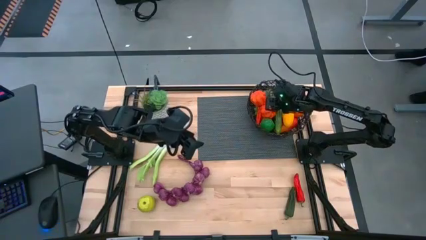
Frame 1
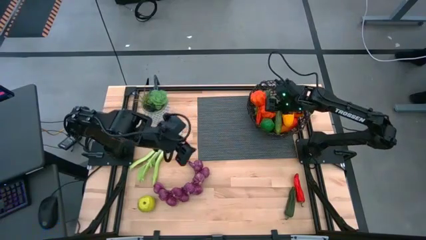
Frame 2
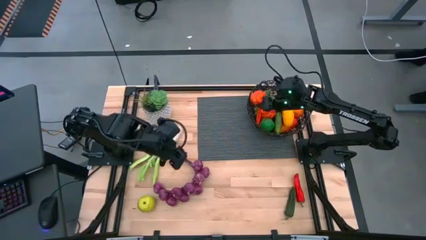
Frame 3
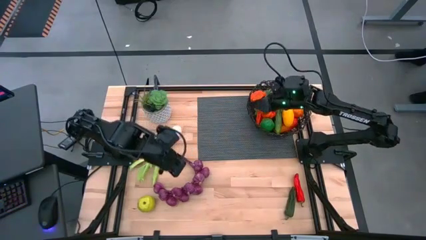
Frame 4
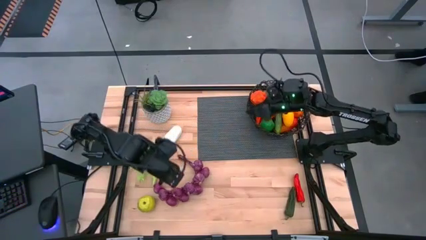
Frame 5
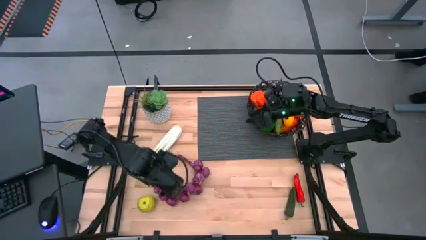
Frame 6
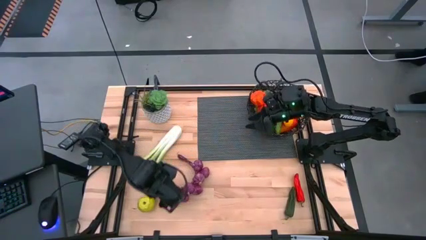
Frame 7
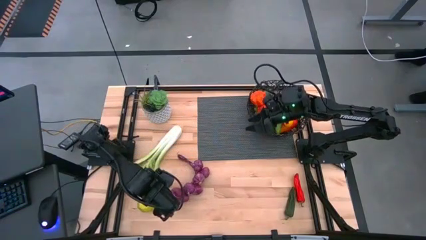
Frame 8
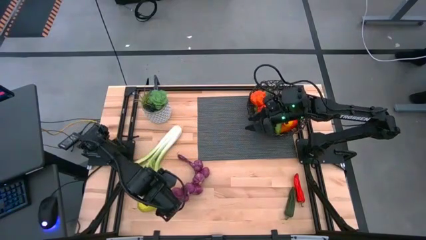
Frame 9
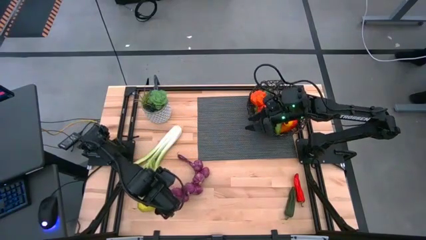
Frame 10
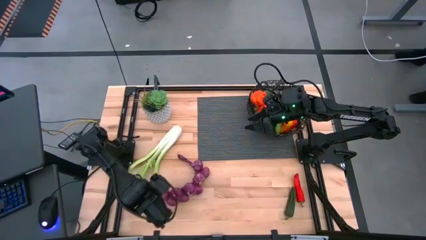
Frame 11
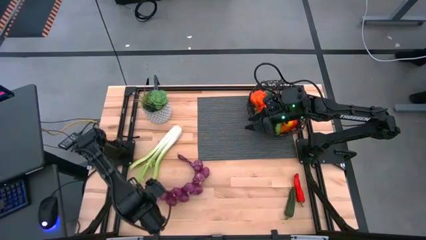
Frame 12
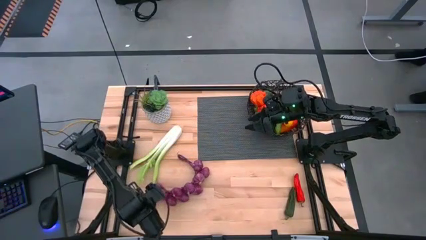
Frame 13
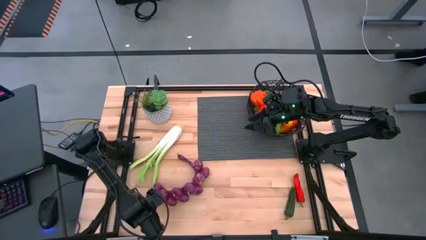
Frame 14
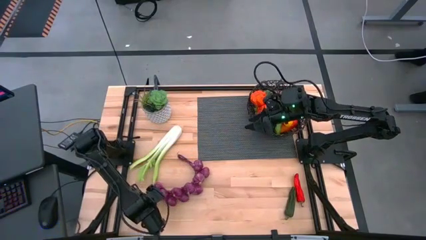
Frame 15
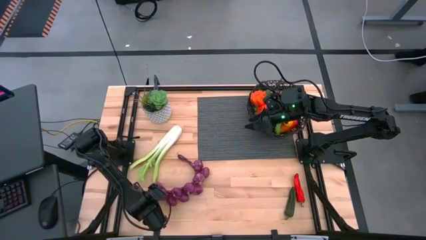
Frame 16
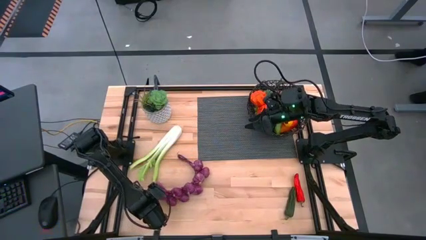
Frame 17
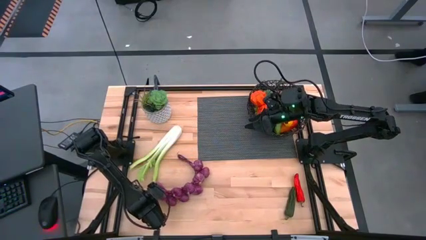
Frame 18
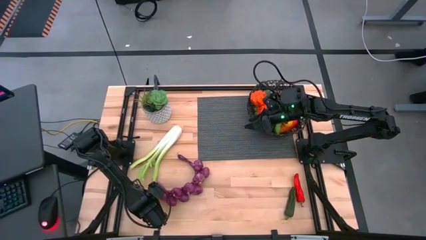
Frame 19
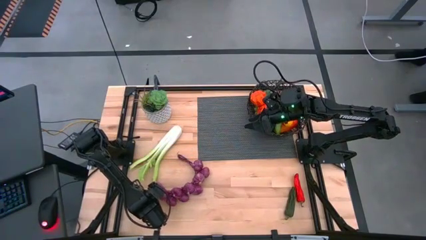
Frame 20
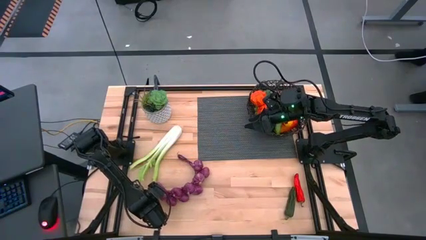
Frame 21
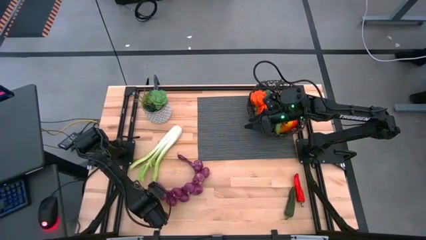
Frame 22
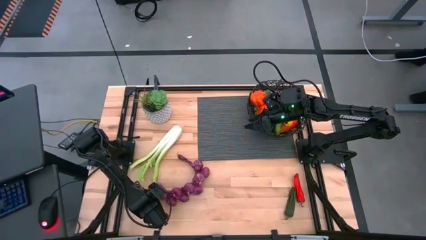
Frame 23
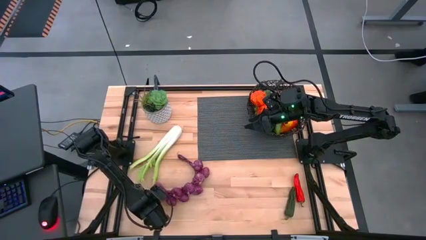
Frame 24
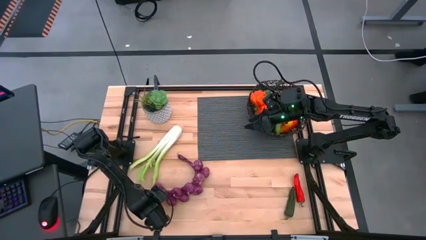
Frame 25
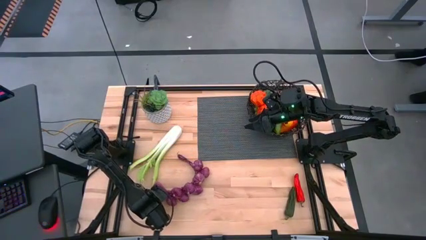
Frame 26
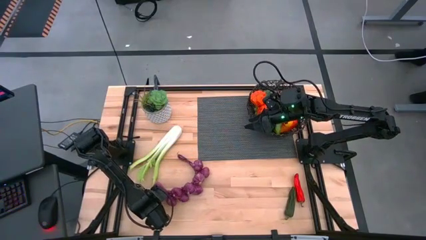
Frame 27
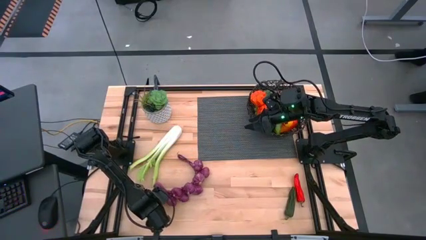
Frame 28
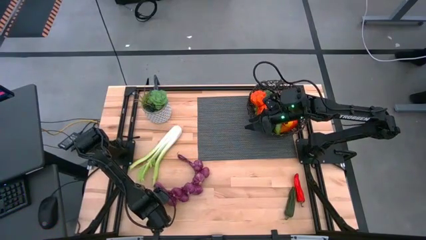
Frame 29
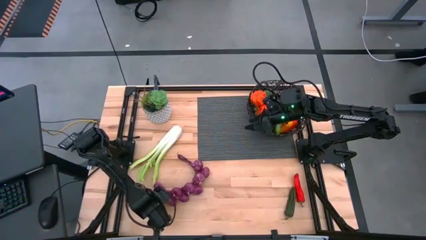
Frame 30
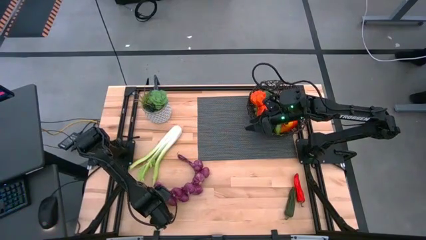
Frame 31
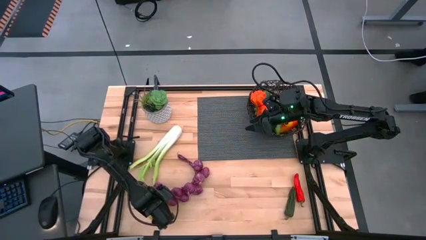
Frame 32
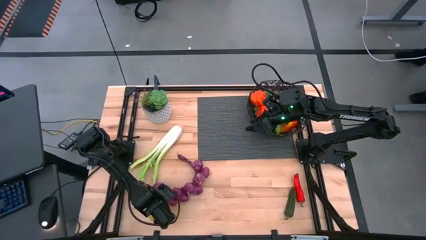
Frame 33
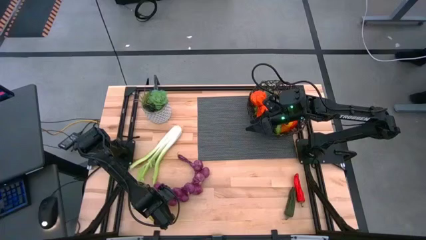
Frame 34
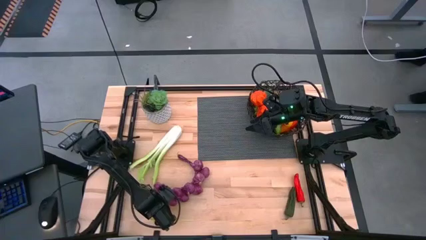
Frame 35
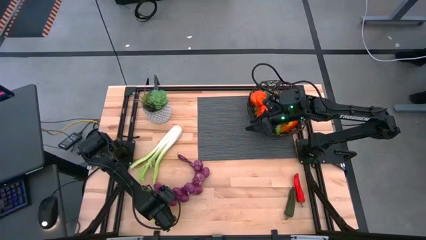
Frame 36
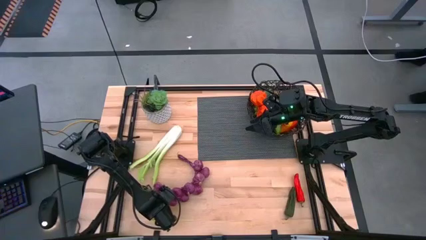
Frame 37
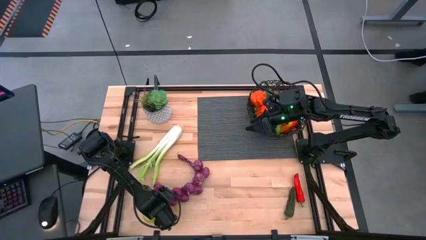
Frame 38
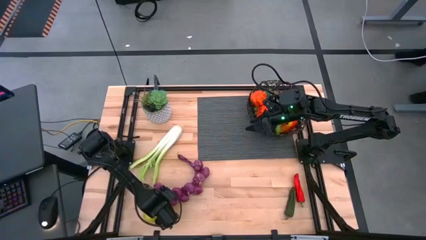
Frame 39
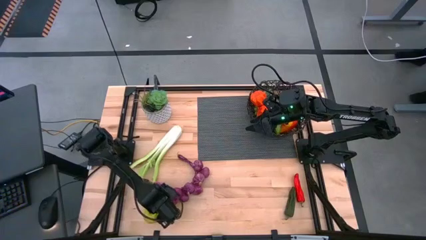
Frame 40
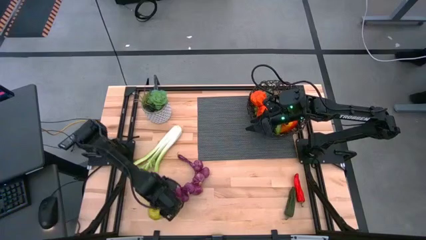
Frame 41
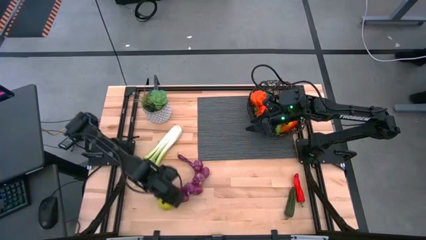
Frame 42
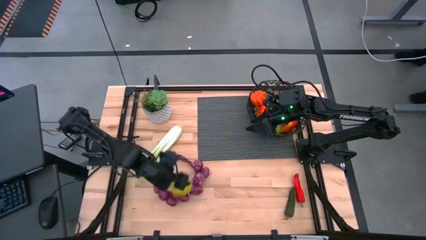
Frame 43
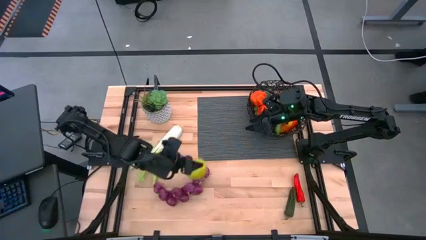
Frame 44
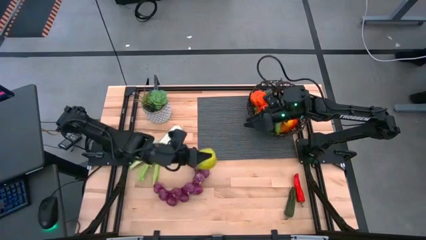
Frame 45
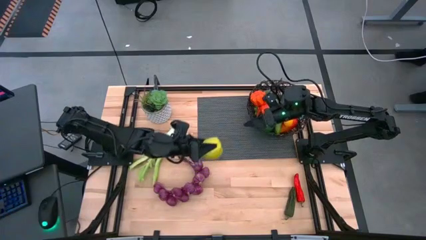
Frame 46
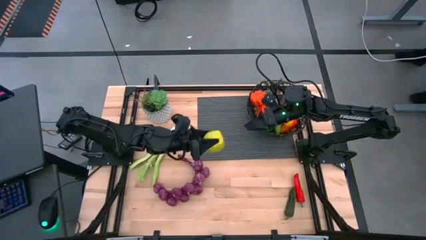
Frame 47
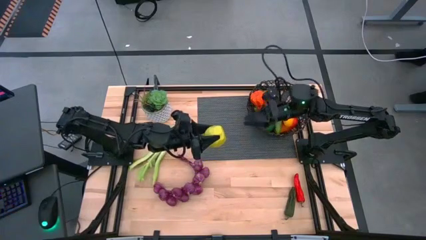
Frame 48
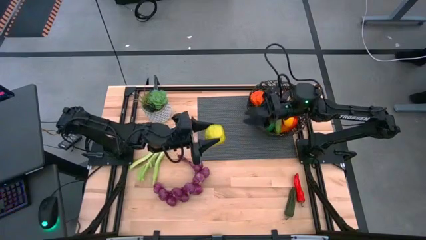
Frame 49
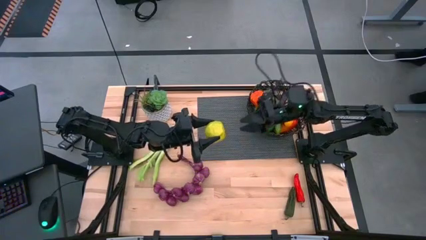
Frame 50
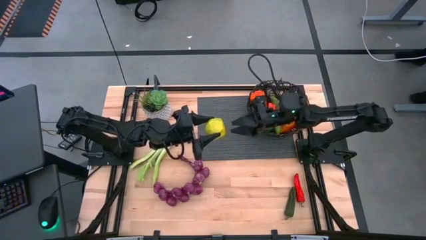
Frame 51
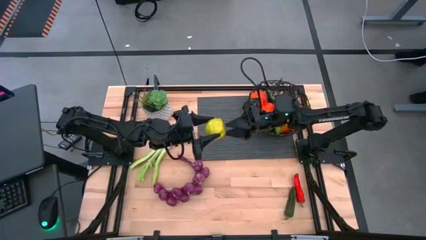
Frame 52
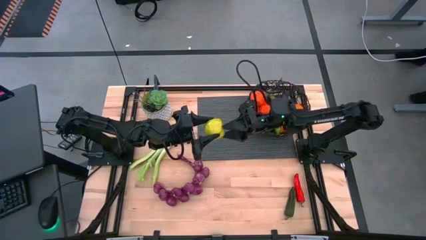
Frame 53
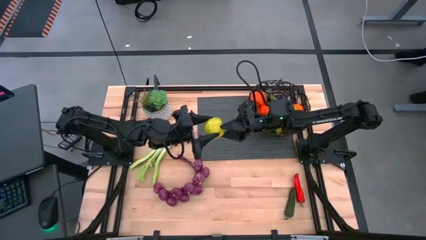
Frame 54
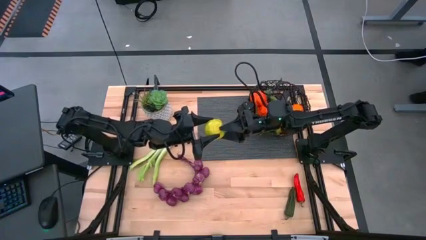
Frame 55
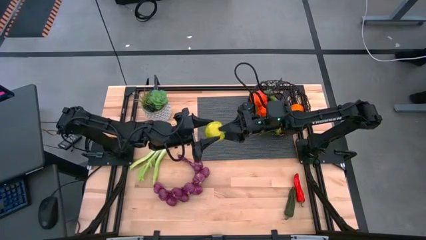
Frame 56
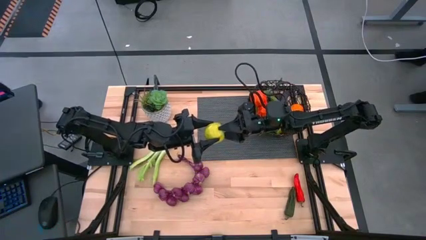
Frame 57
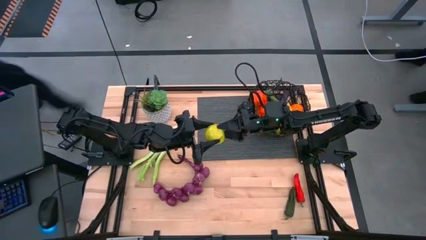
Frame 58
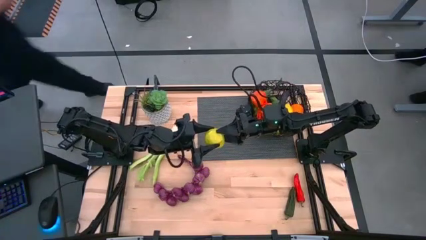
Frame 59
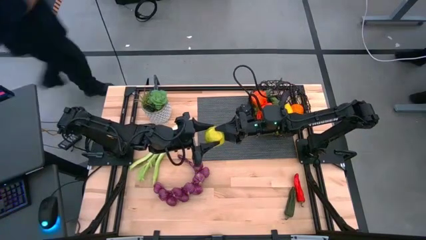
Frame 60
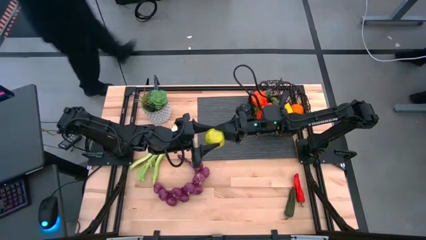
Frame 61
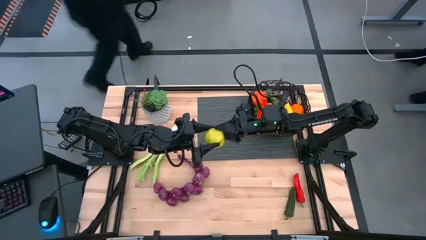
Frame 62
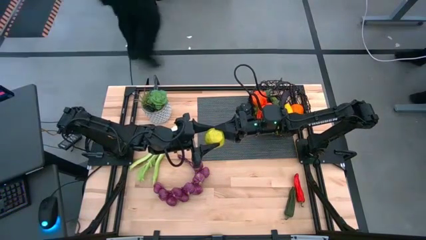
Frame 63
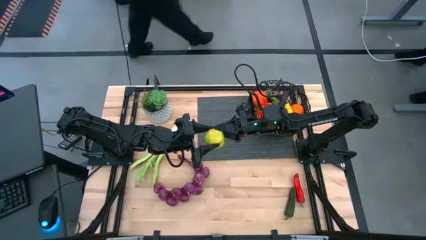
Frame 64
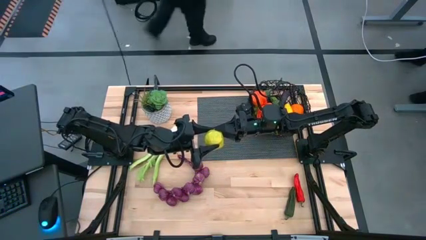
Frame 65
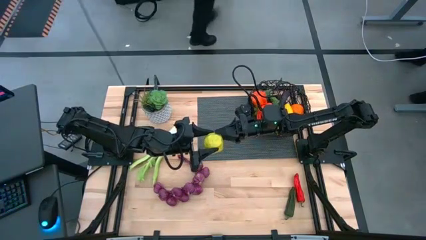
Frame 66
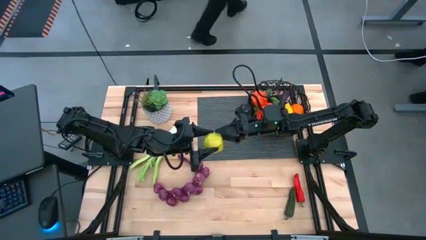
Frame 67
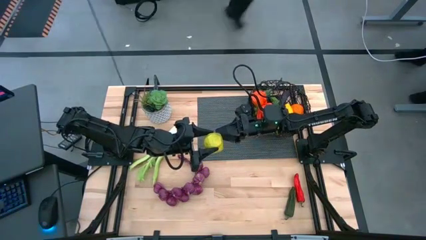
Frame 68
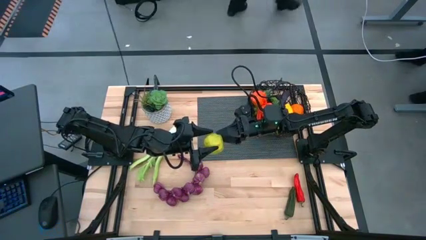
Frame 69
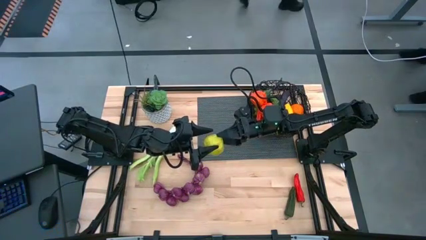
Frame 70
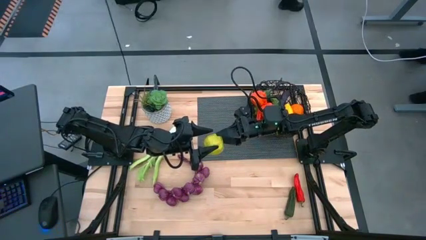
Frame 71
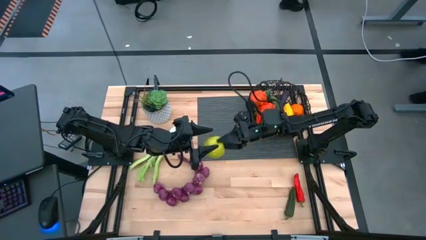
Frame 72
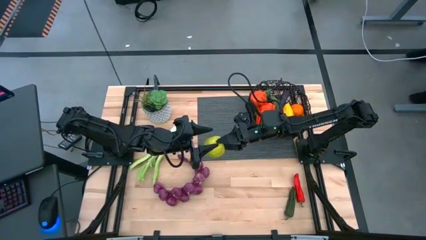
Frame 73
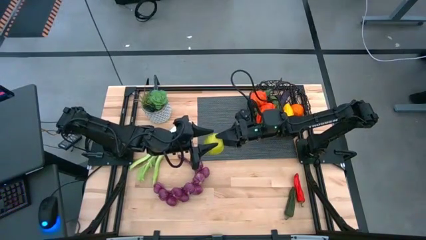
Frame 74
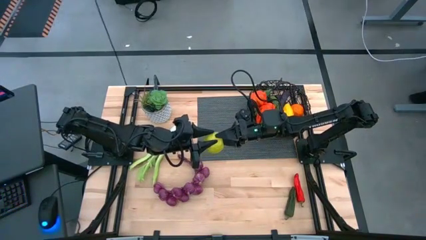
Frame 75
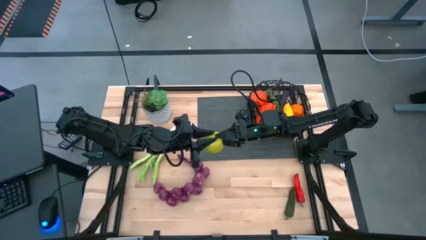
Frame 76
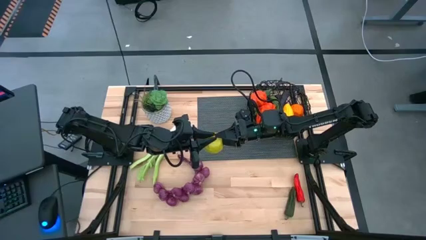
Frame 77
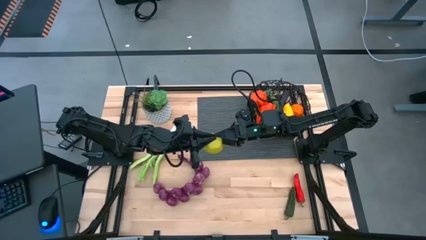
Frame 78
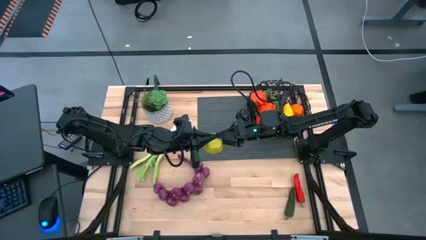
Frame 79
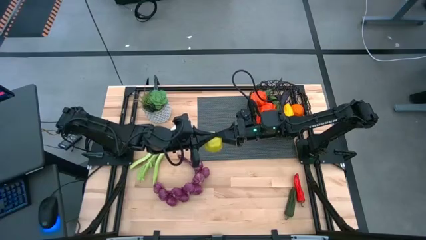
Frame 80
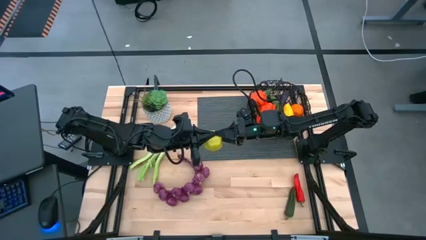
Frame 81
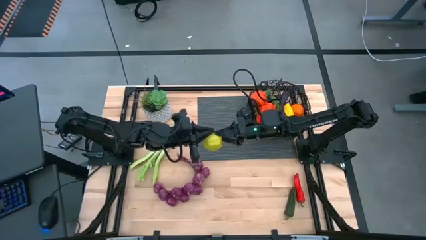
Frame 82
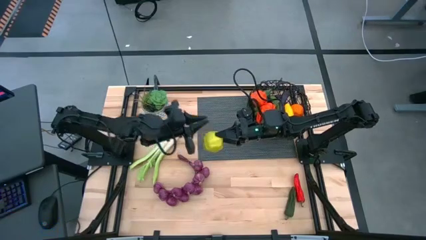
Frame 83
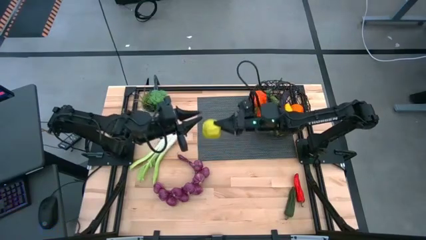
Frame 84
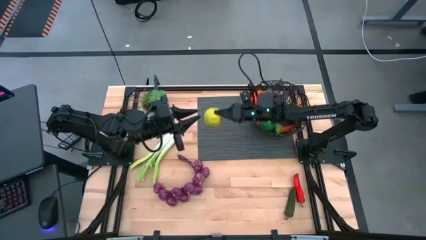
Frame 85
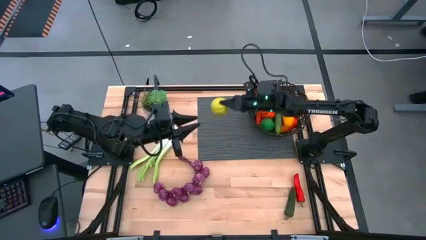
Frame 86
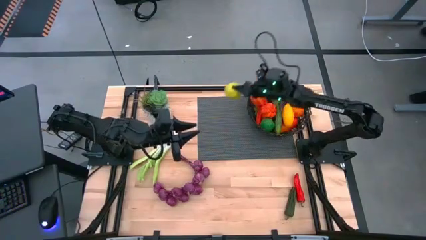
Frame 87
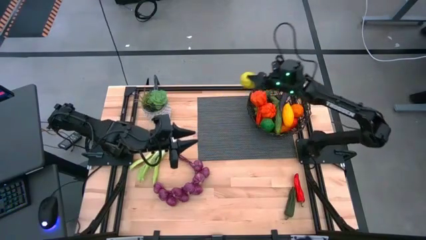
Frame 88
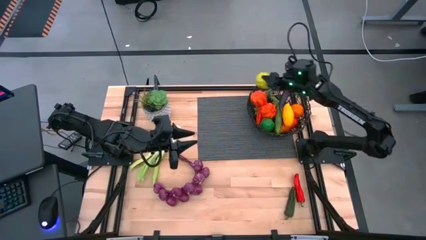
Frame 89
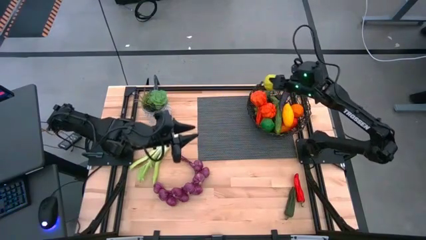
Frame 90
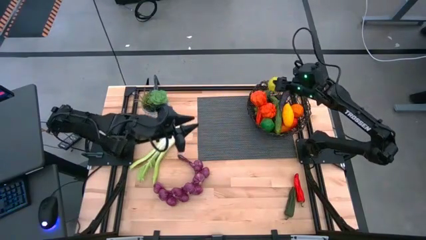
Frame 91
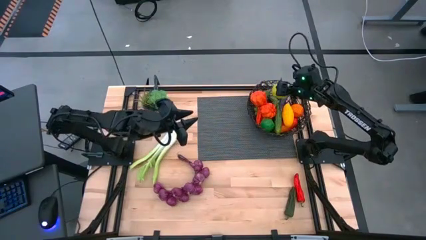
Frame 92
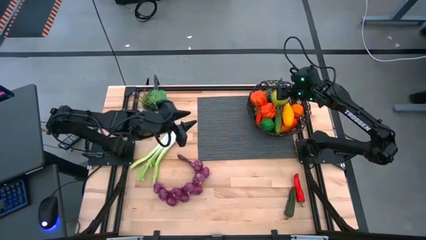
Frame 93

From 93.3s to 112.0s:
Task: Build produce basket
Put the green apple into the black basket
